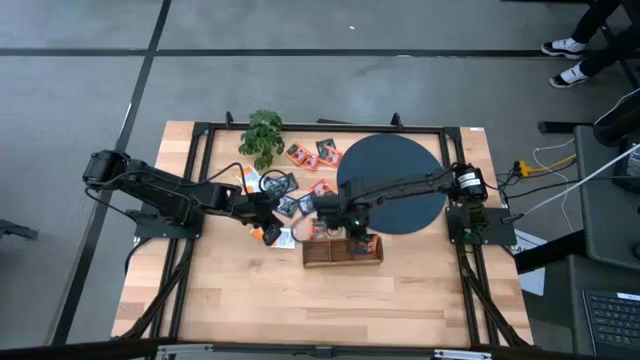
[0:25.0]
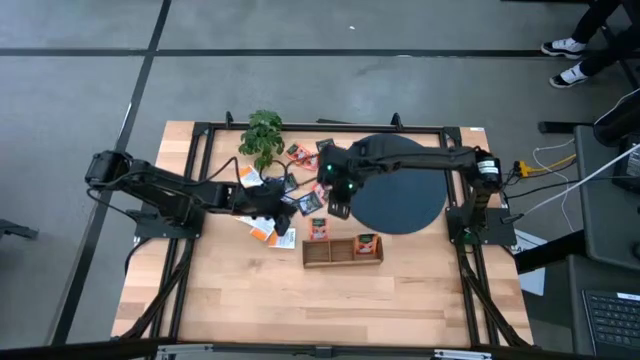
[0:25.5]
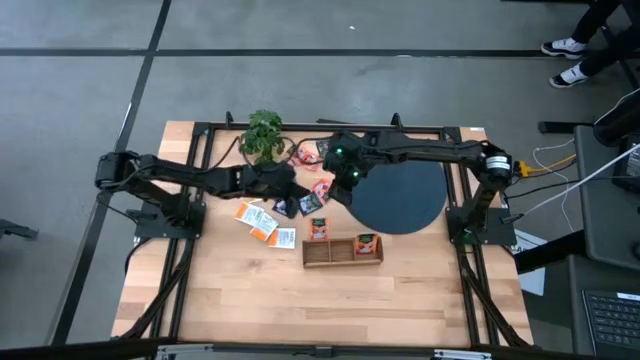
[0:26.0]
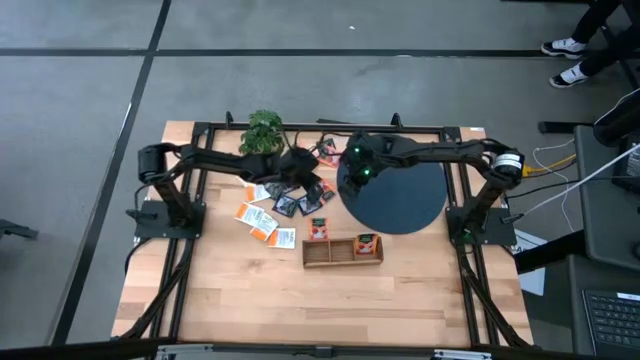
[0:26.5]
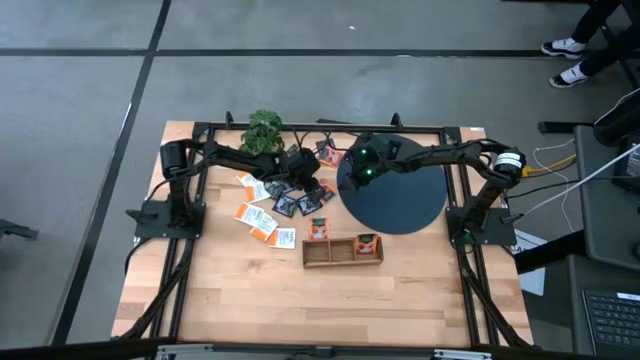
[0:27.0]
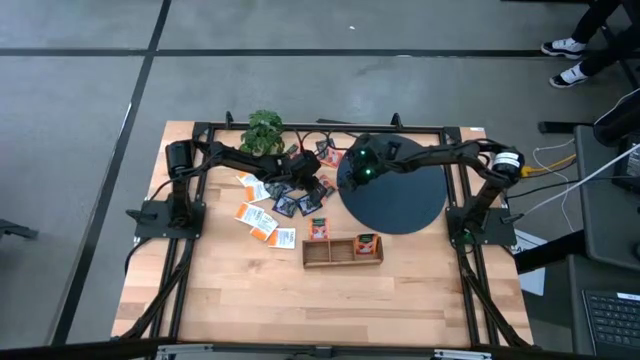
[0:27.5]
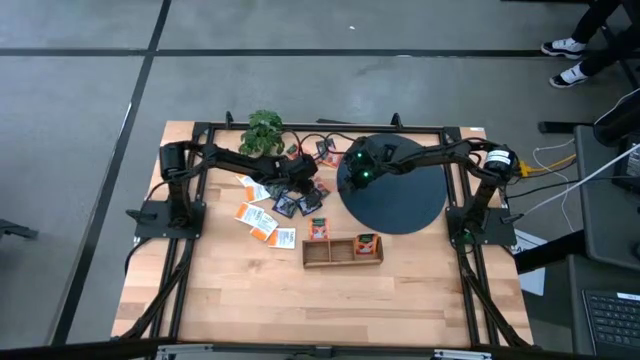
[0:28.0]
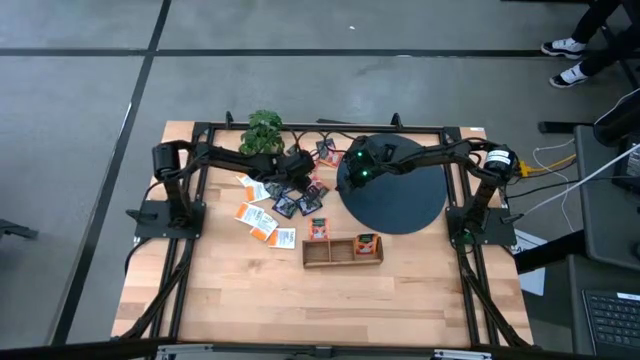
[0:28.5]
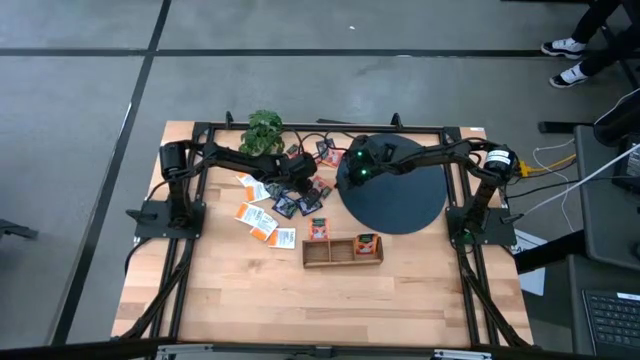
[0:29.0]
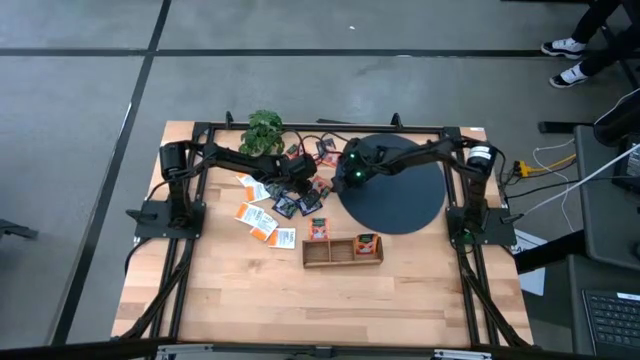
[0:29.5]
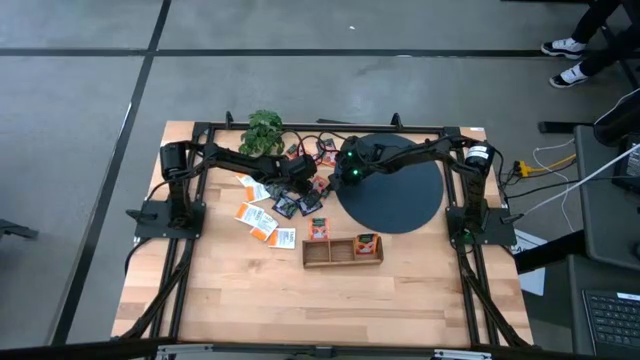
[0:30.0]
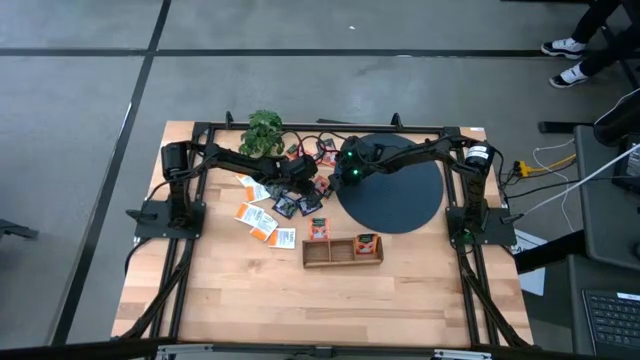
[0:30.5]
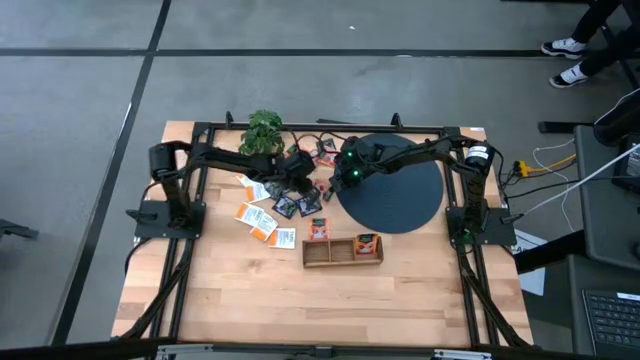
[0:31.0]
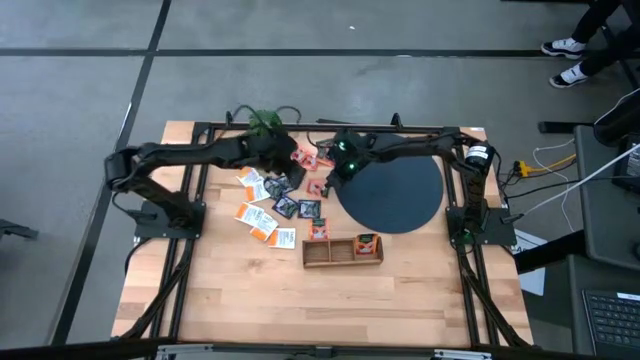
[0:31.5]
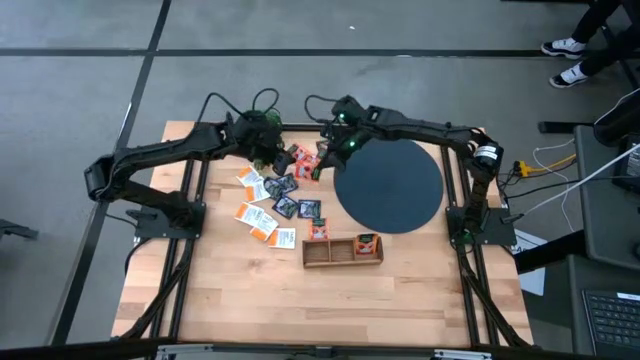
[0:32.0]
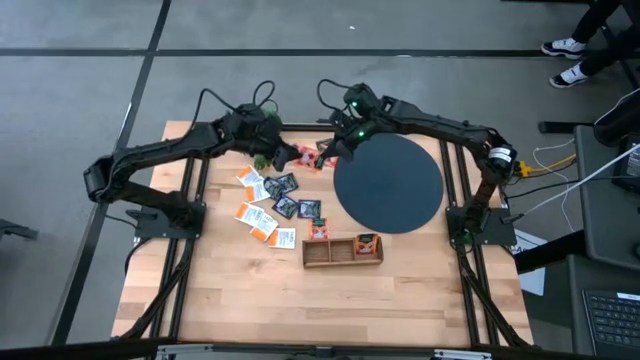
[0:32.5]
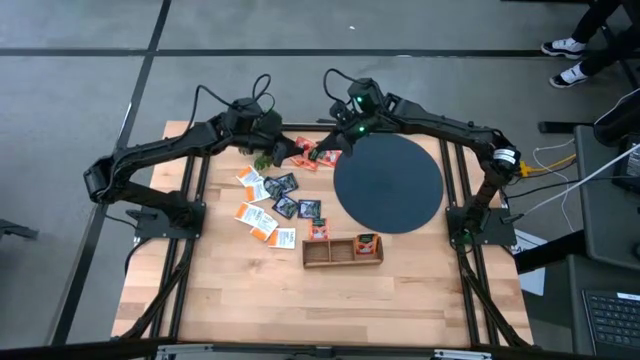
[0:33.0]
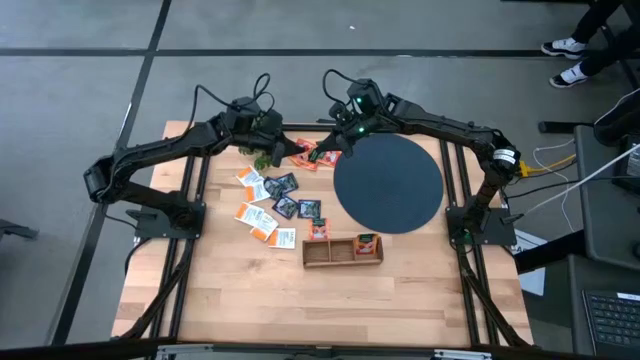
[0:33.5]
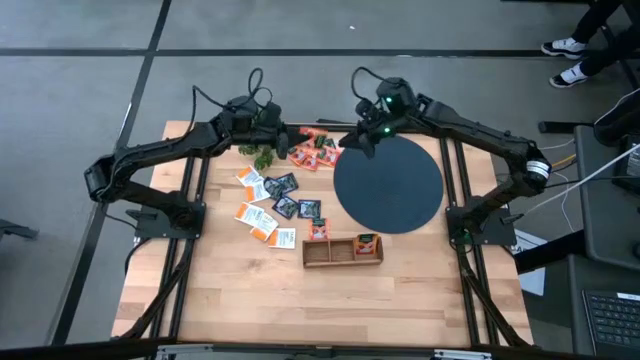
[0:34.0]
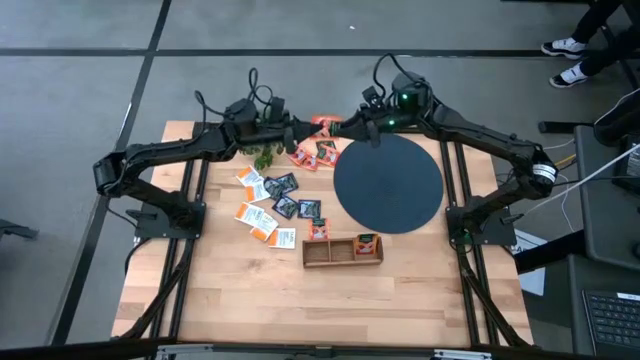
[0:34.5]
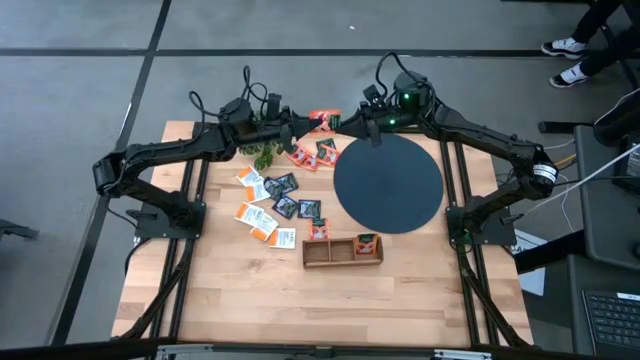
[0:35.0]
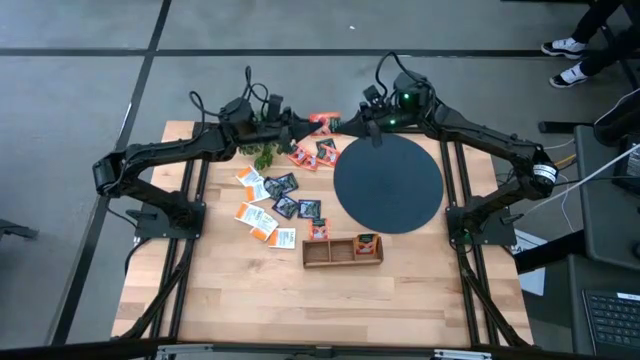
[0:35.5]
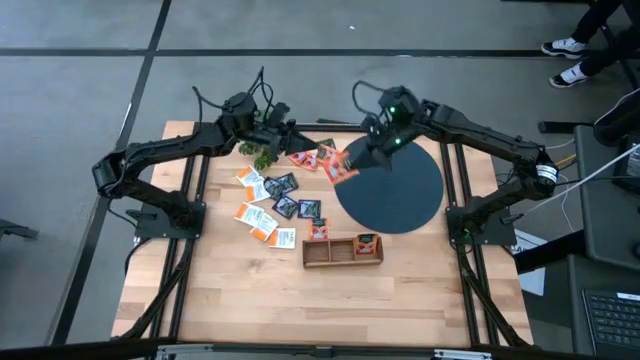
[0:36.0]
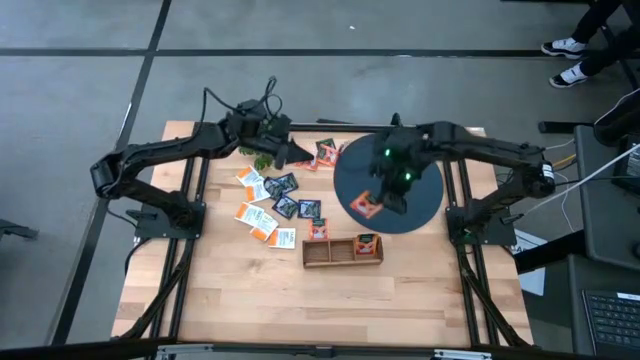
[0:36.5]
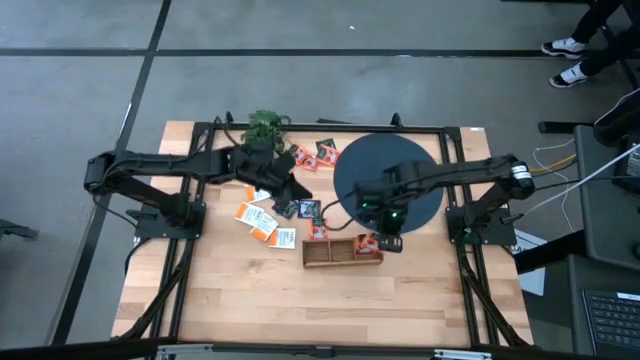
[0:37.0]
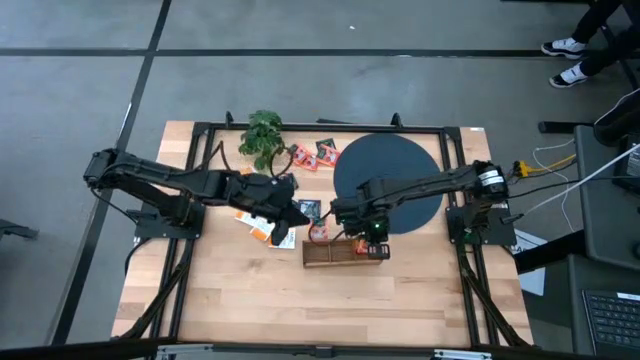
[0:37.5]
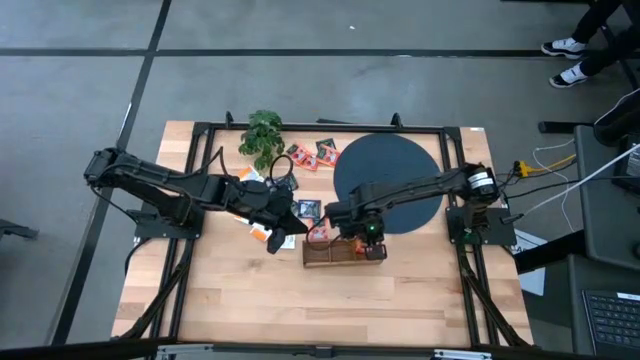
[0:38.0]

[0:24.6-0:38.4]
Task: Pick & Place Tea
Put the orange tea bag into the right section of the wooden organizer

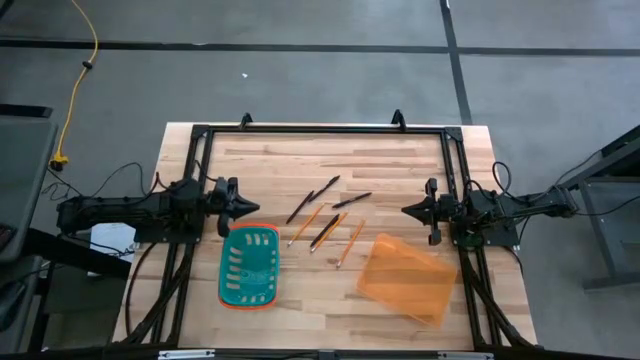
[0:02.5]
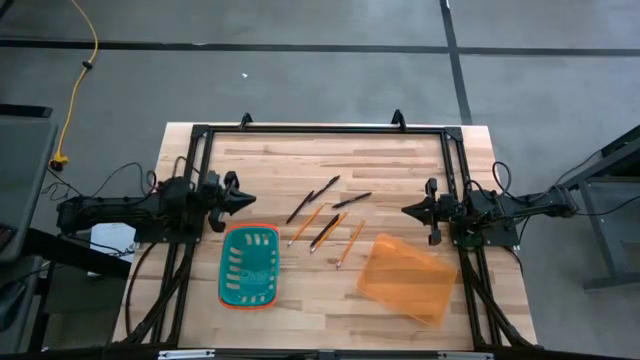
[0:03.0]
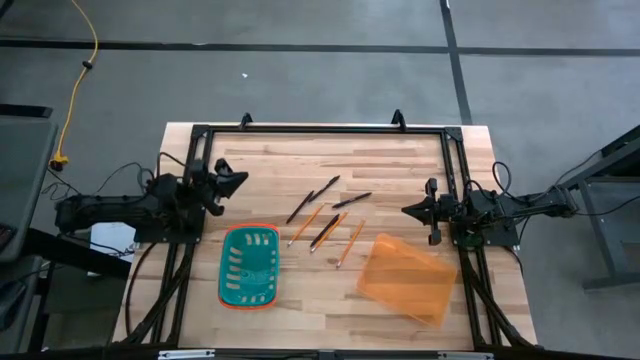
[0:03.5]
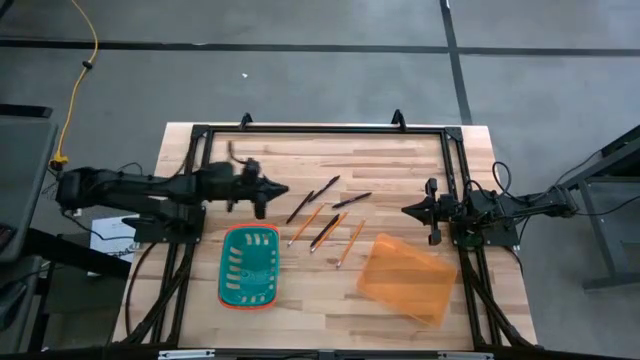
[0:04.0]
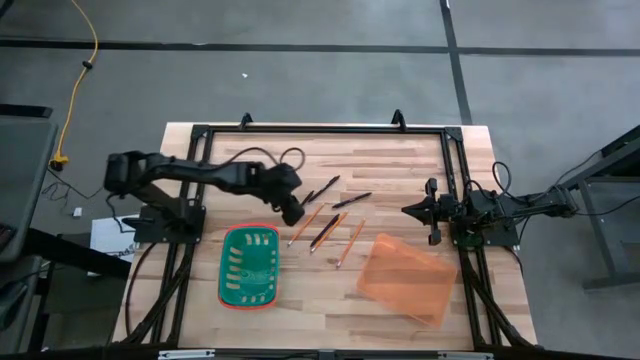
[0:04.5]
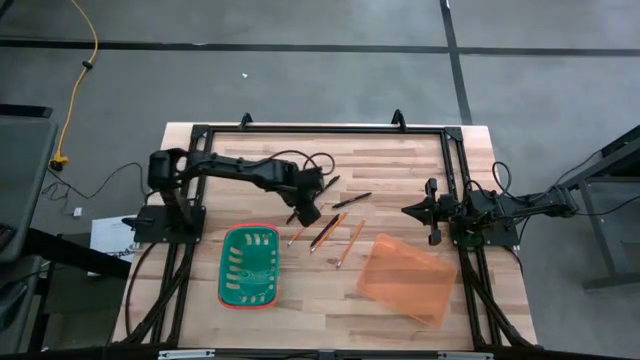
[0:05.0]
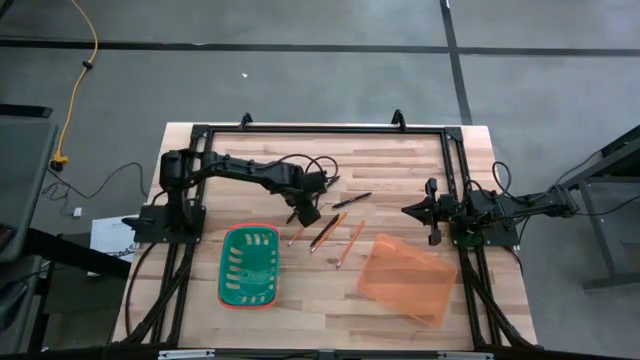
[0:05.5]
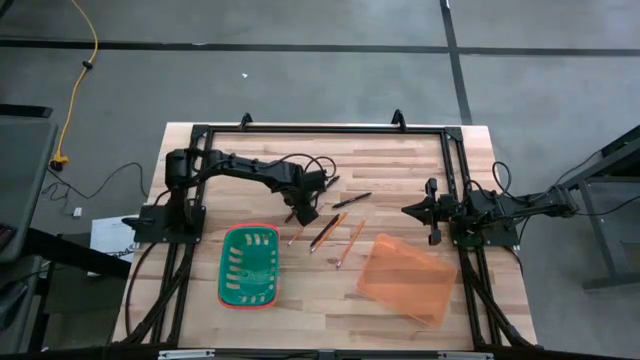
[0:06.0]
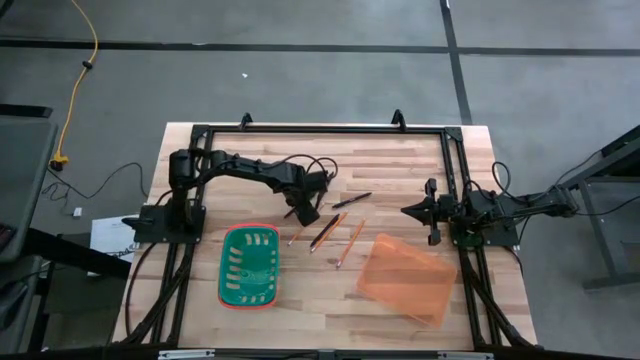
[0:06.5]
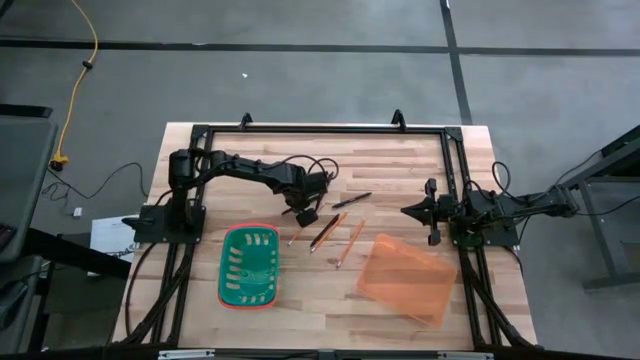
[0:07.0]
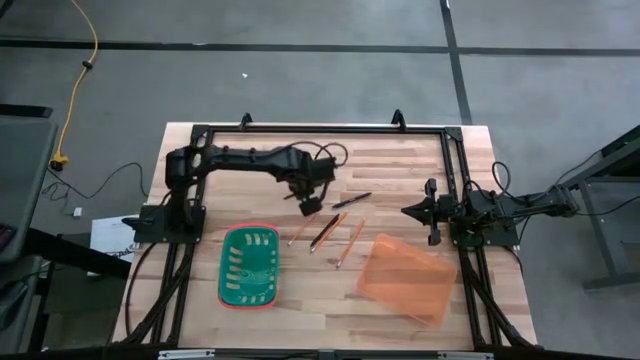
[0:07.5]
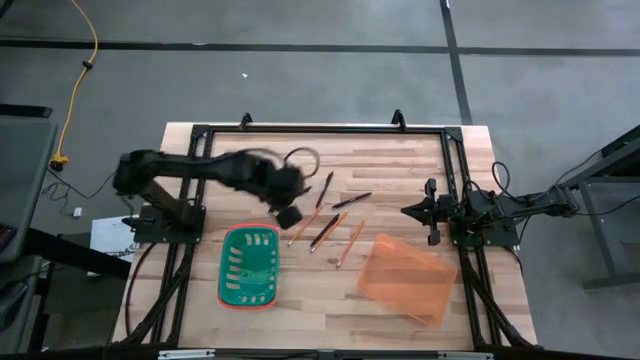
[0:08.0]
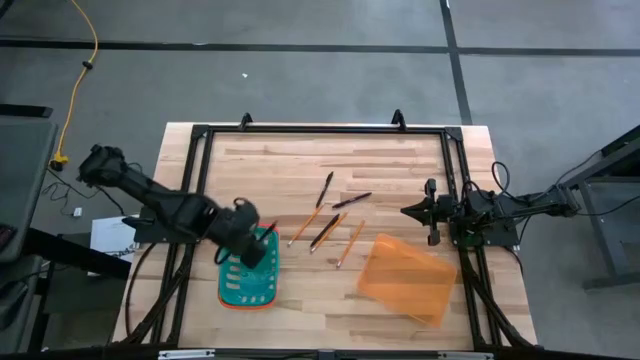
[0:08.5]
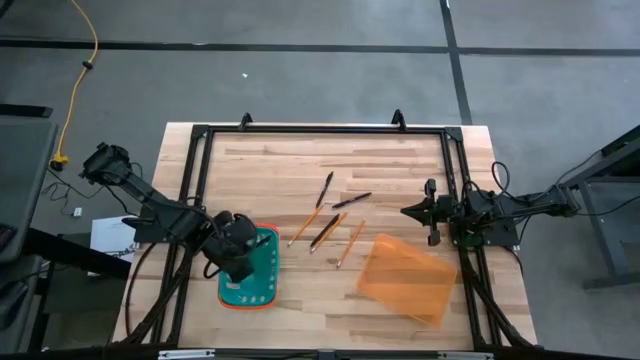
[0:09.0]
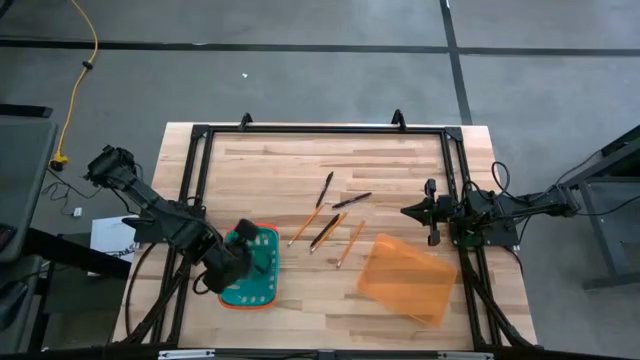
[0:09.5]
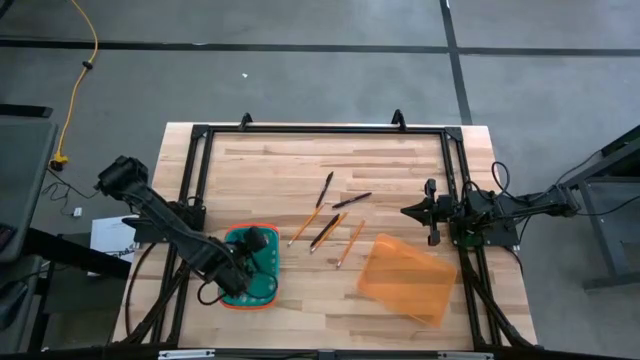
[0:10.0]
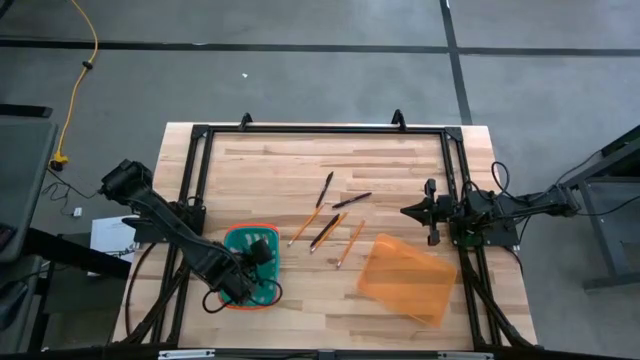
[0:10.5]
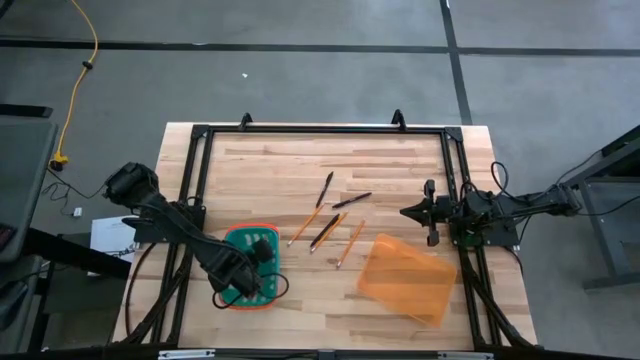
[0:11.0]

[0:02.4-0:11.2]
Task: Sort pens & pencils
Put the black pen into the blue bin
